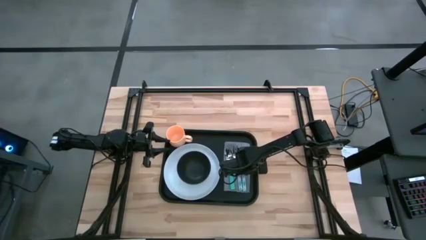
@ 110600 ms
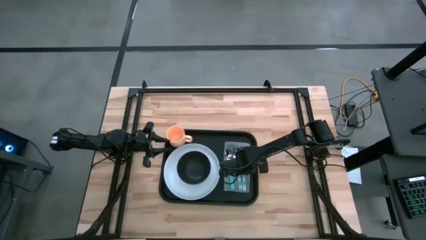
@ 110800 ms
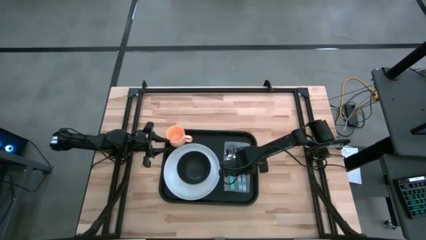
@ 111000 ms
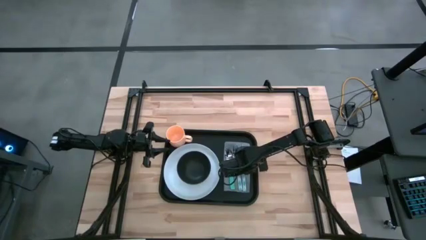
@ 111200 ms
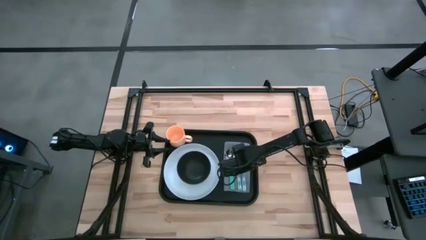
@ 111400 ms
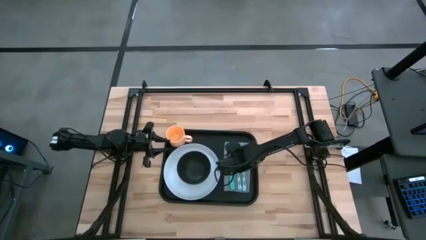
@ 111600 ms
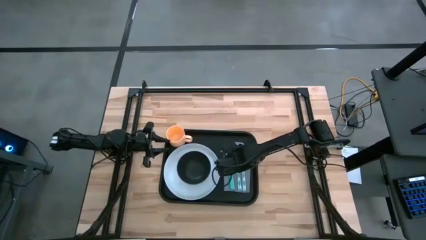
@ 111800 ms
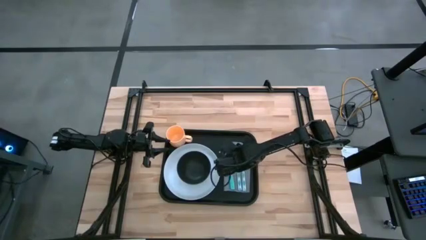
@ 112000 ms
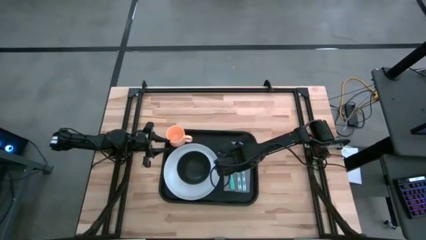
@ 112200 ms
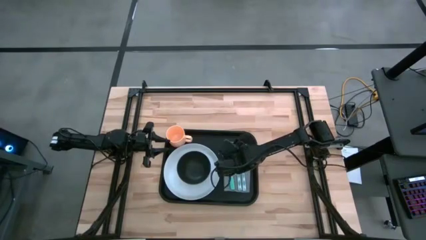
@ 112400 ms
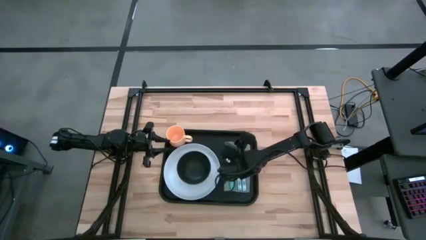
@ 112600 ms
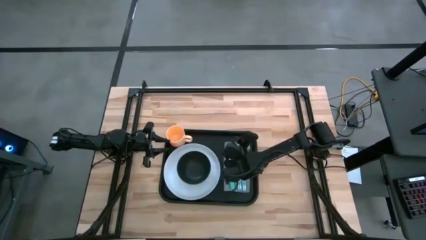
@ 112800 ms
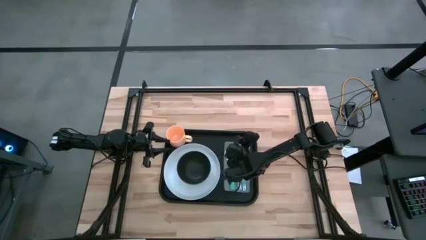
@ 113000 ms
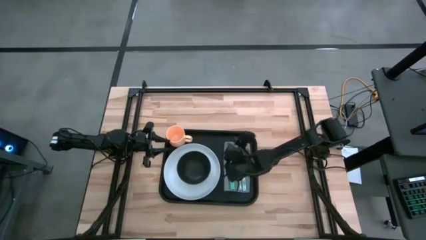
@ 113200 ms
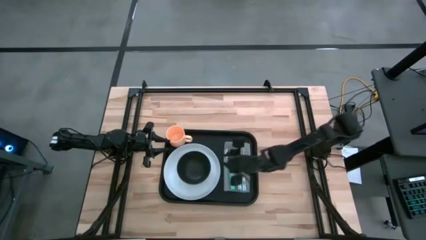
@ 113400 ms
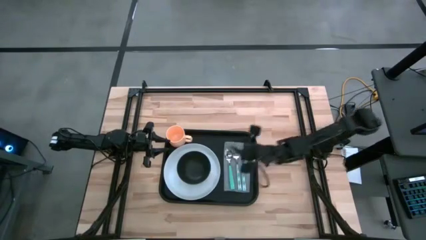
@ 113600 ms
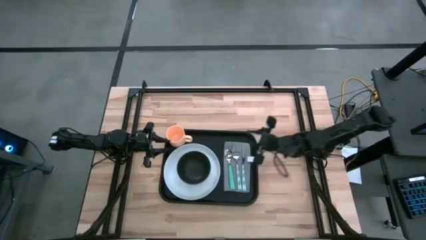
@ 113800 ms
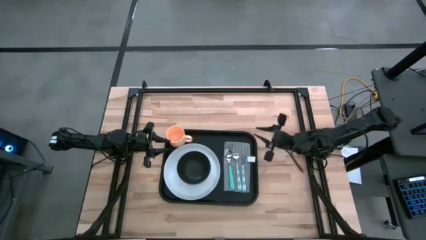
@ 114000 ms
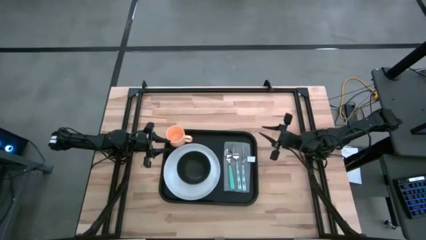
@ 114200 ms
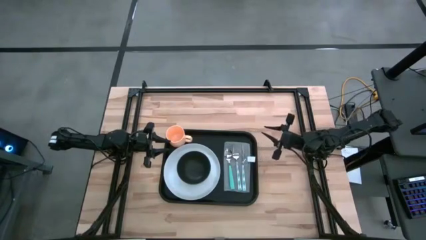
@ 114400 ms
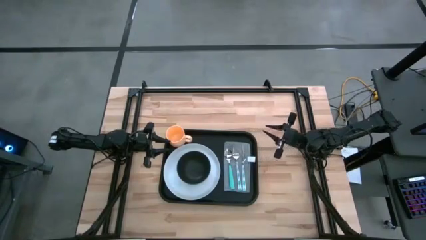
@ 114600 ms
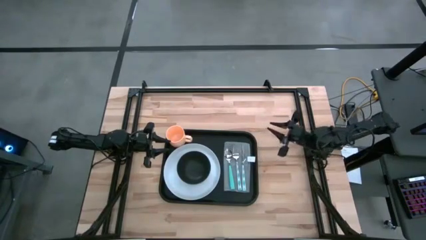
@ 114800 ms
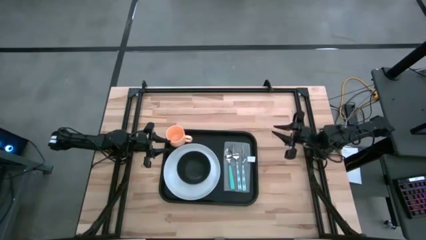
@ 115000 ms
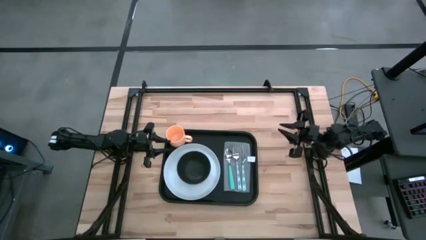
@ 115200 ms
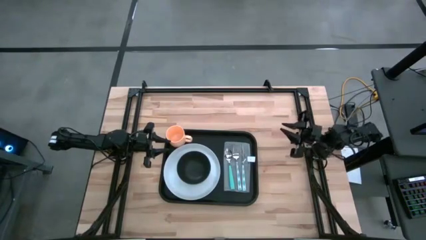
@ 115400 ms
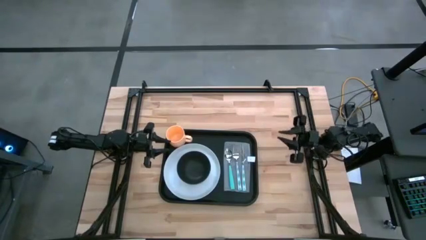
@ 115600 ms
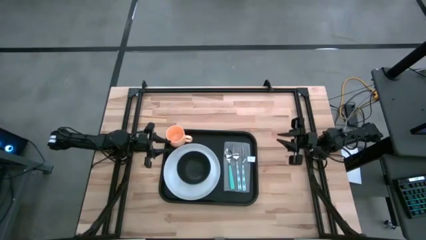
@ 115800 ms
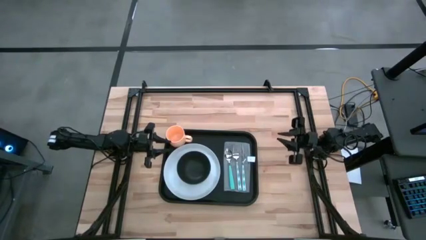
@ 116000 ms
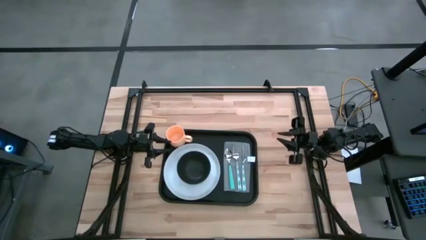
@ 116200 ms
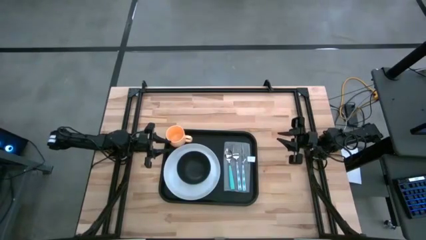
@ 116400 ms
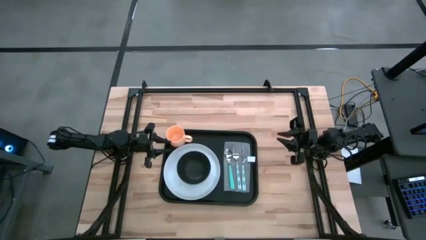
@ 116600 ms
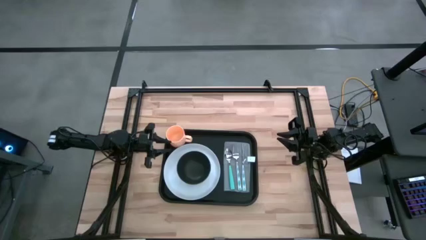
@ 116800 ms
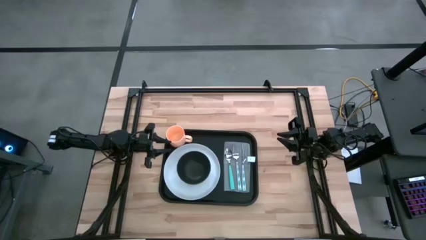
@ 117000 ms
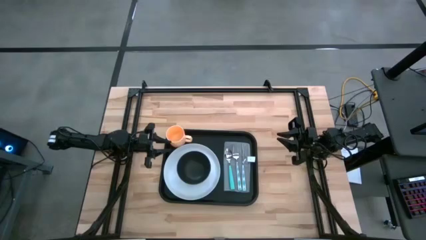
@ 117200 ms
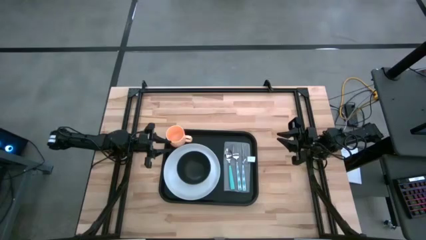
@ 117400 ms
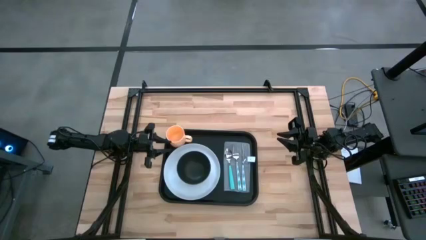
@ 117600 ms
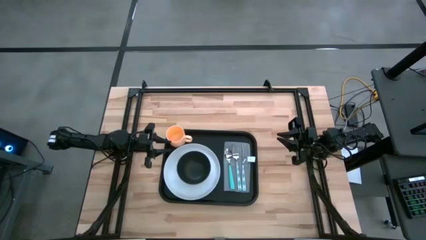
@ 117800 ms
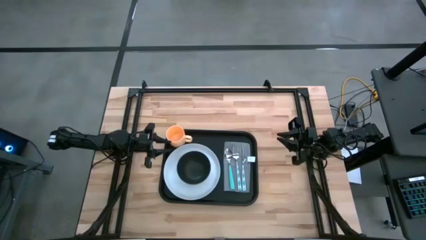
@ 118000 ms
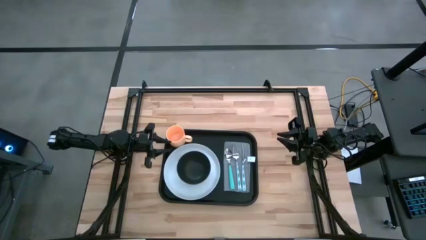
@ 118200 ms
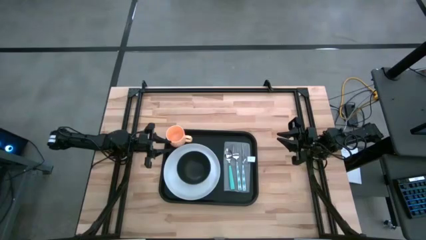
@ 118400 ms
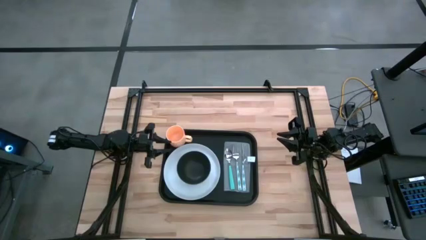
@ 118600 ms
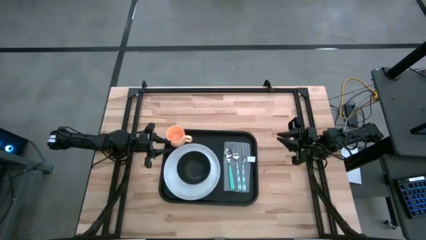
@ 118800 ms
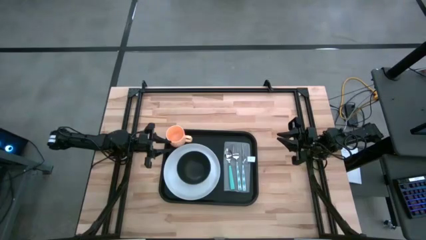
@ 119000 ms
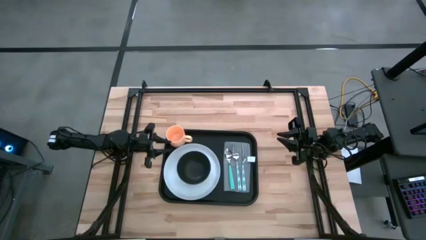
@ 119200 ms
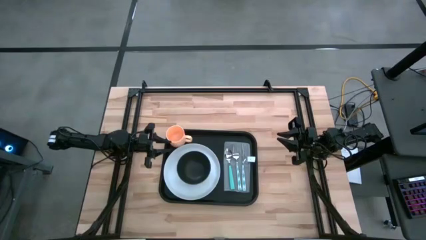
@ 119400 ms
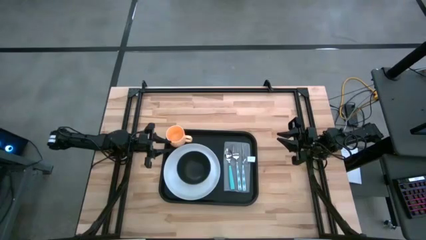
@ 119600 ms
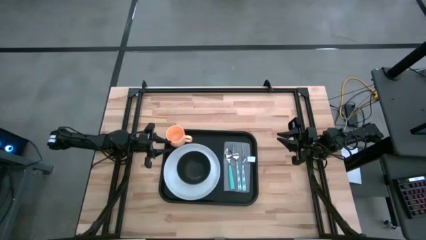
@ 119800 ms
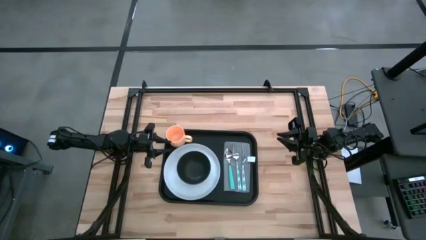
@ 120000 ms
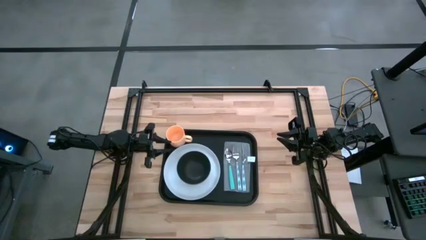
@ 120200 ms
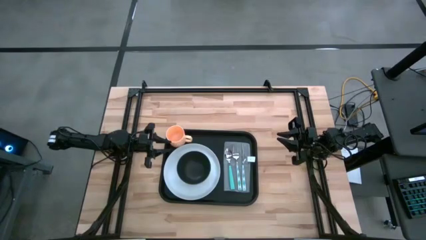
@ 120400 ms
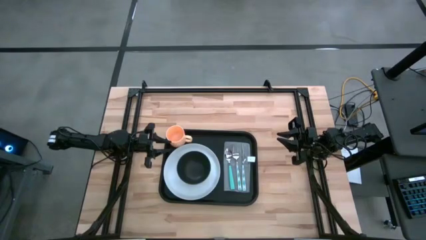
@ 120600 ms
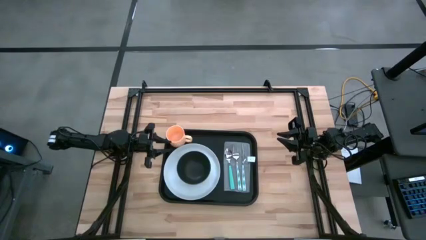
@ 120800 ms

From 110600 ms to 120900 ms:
Task: Set up tray
Return to Home Position

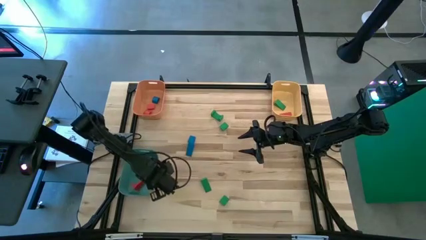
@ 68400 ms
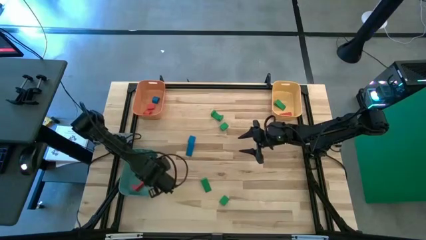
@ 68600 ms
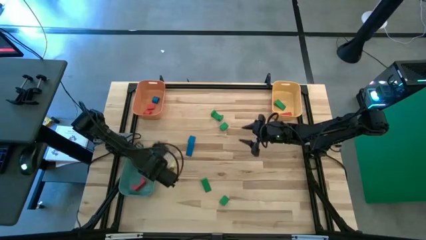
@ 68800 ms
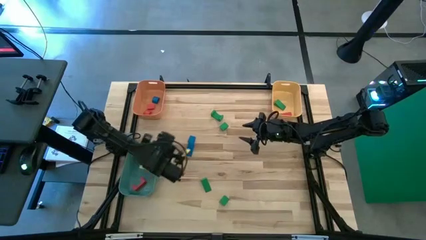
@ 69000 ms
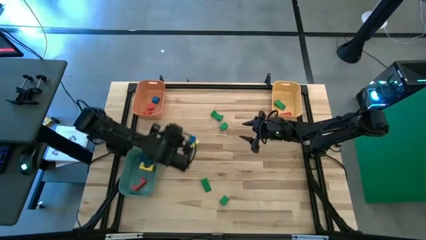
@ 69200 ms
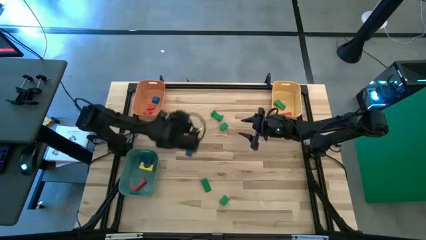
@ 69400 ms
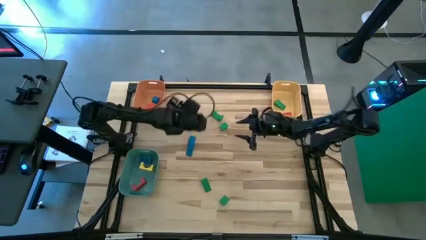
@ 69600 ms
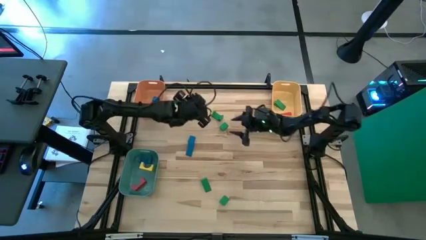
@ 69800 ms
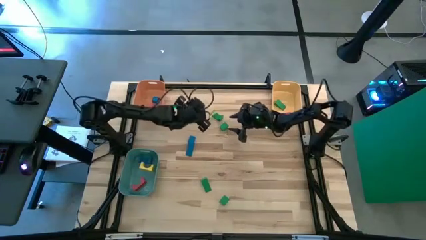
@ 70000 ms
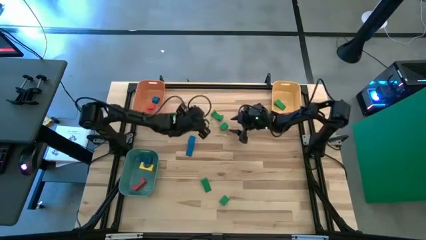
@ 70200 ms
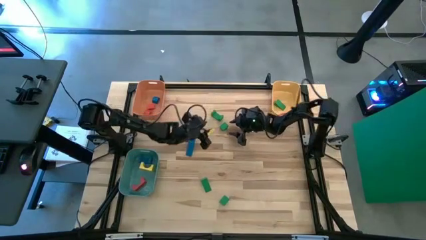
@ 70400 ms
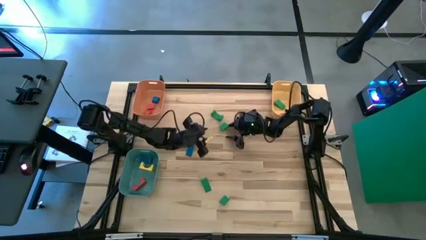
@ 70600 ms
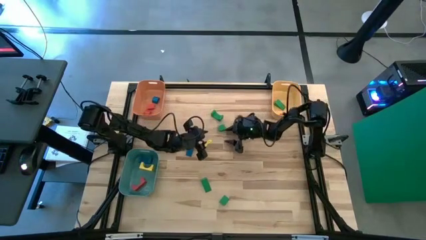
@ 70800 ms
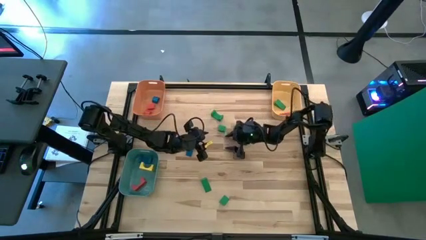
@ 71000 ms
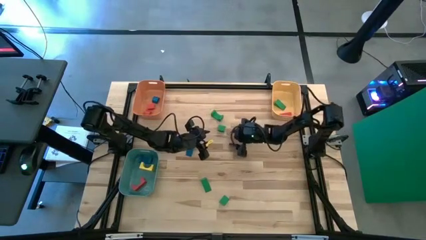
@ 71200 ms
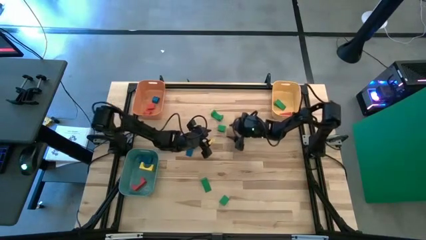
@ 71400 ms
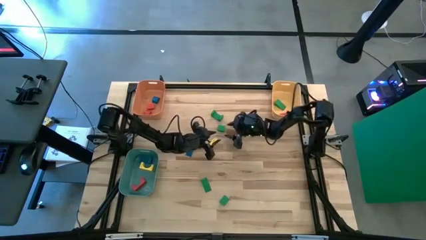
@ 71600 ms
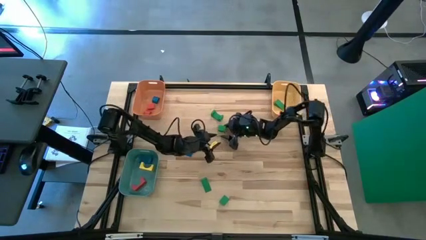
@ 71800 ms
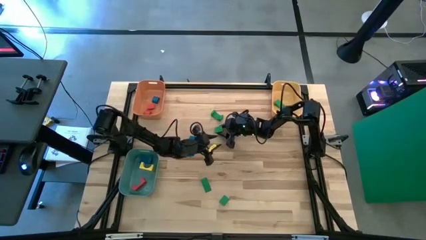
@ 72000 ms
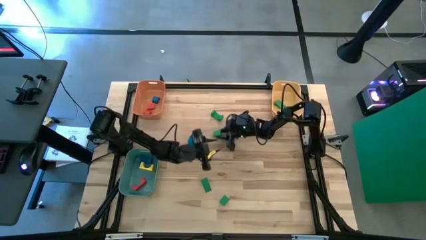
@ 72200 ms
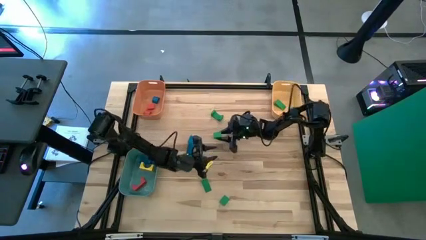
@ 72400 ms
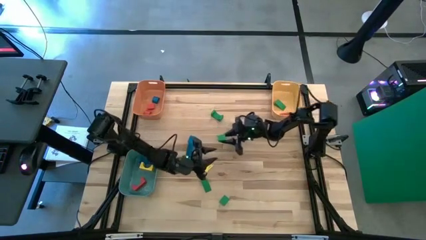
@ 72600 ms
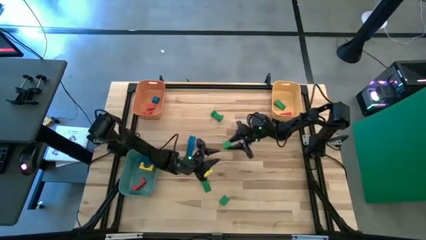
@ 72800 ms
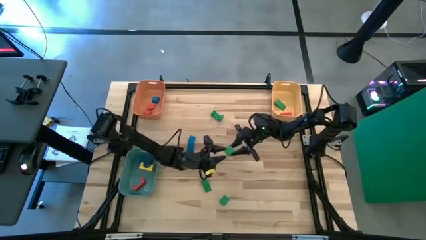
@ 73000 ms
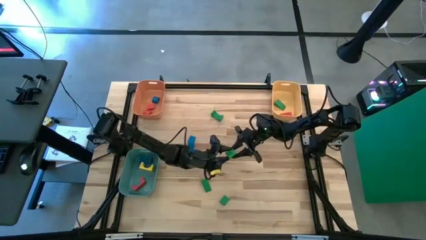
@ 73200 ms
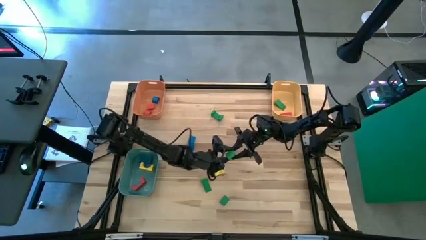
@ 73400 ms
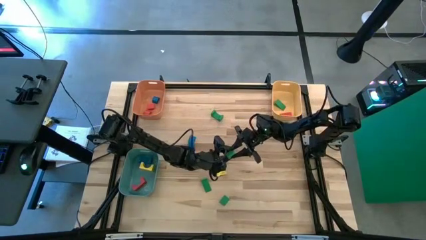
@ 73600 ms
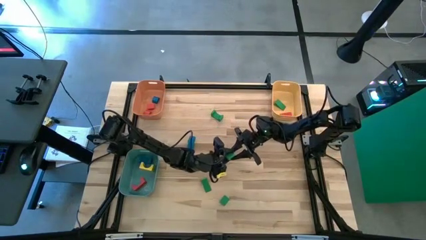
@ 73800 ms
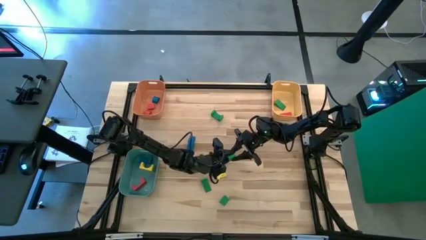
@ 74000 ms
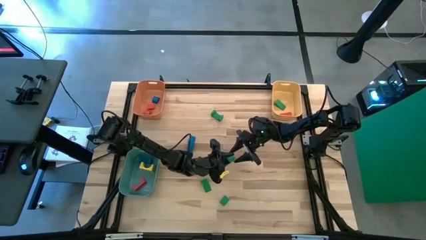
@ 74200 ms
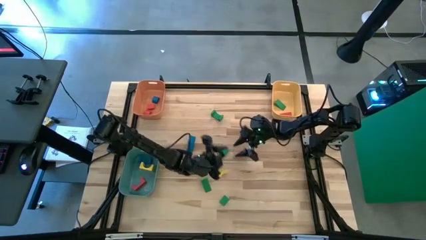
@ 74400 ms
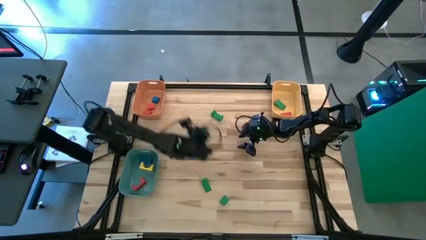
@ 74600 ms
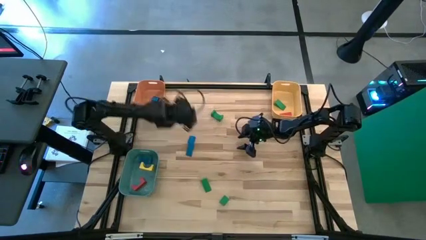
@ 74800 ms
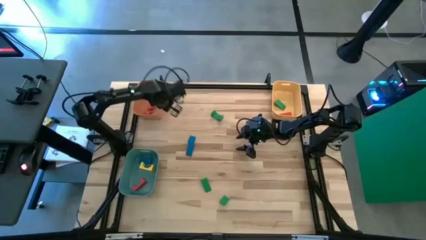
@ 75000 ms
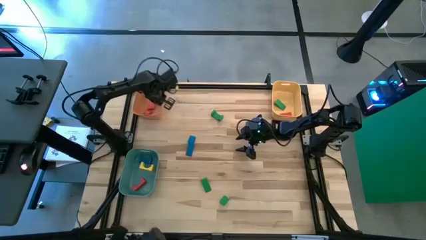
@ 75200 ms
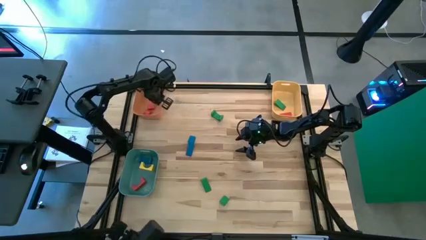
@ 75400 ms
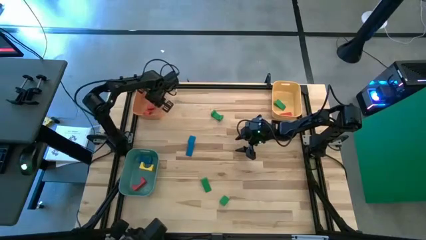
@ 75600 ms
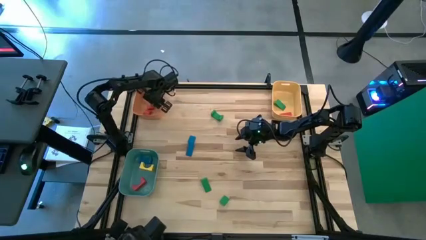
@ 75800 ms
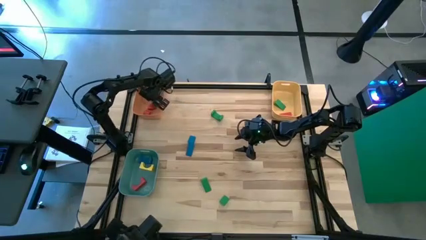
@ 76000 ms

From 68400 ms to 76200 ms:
Task: Sort blocks by size
Put the green half circle block into the orange bin
